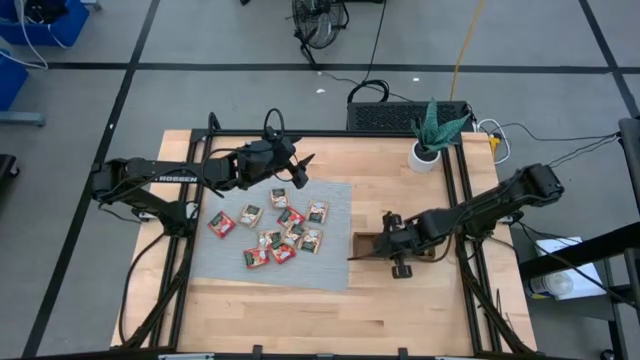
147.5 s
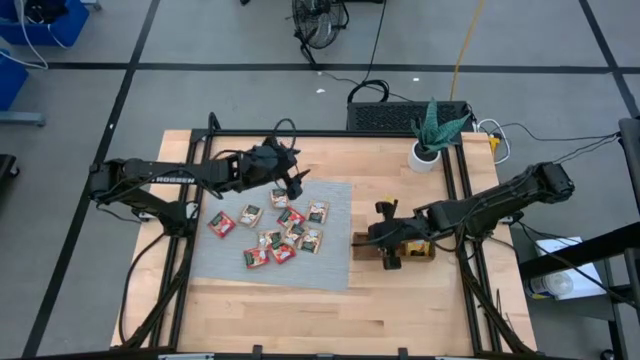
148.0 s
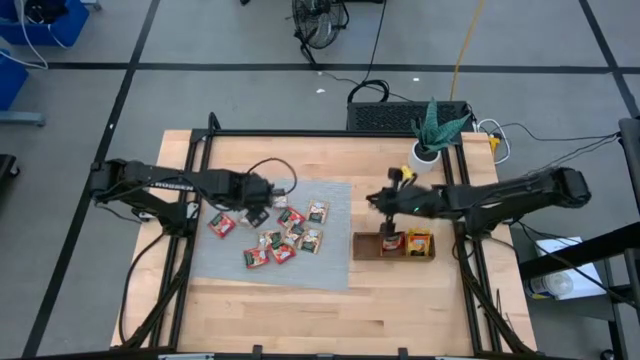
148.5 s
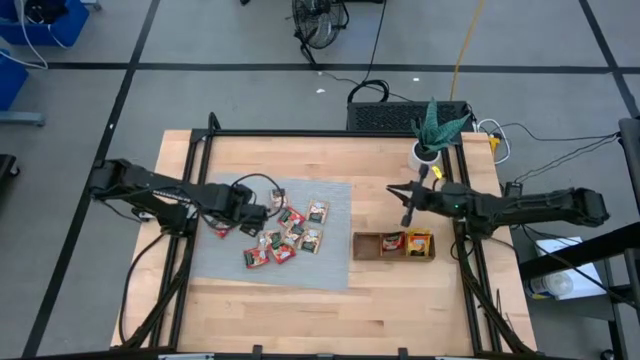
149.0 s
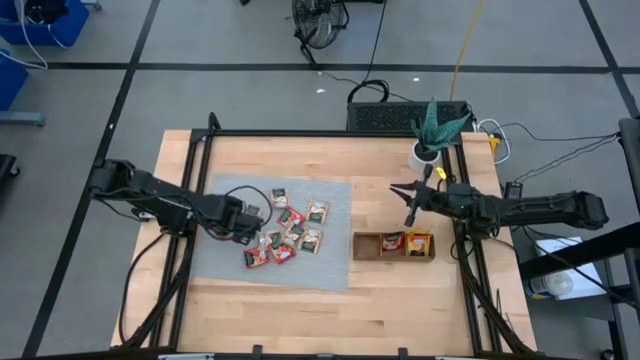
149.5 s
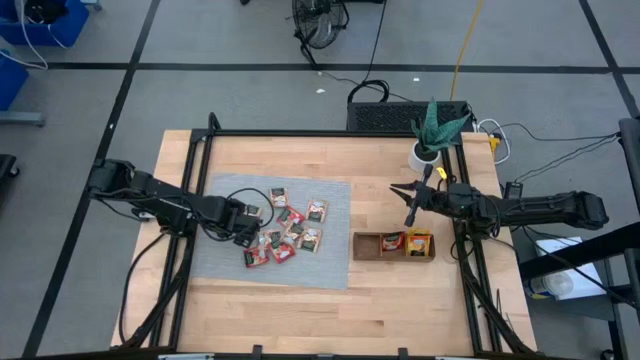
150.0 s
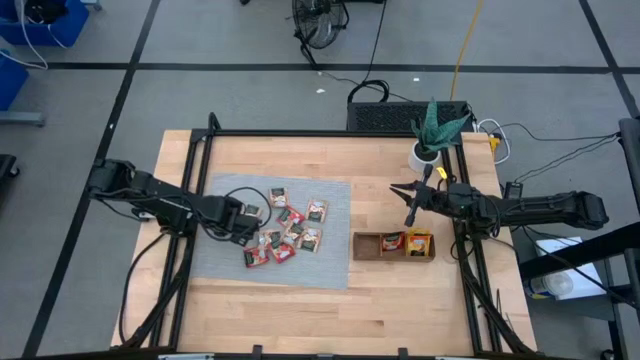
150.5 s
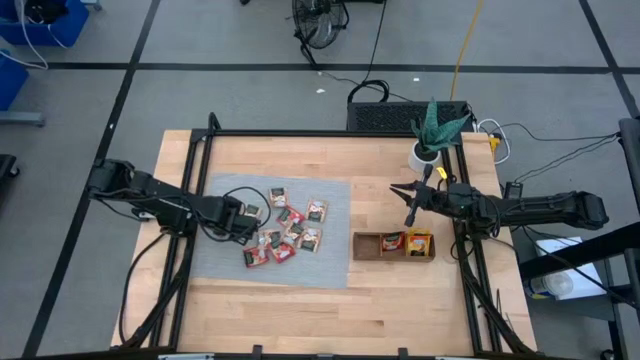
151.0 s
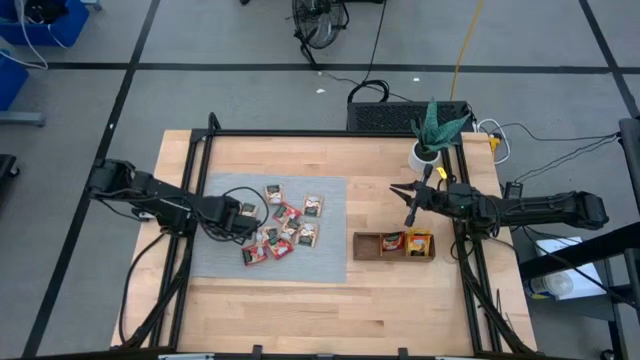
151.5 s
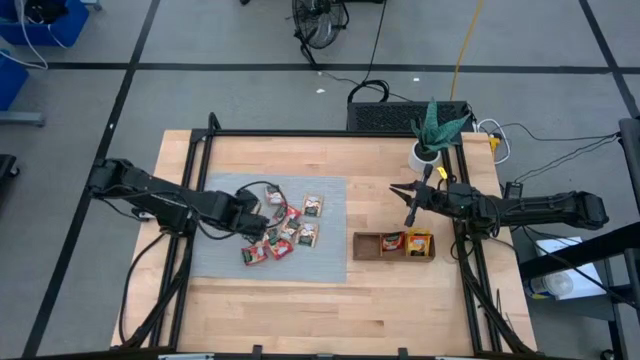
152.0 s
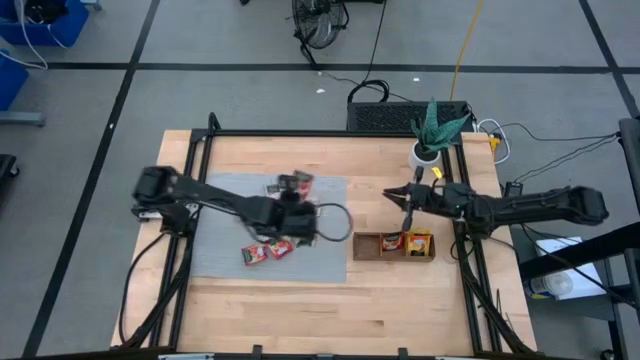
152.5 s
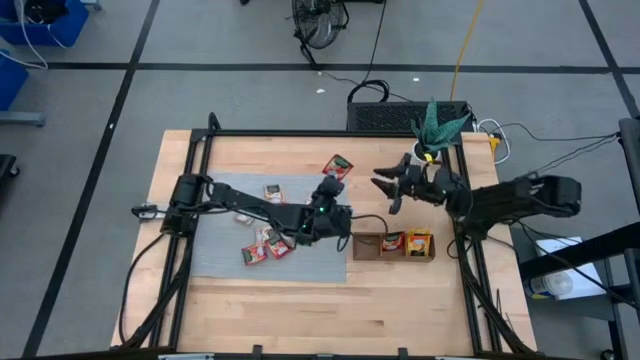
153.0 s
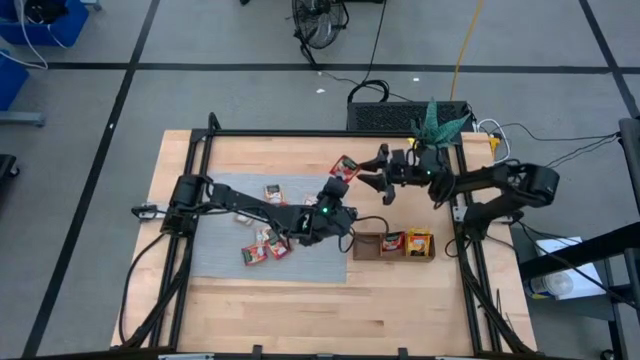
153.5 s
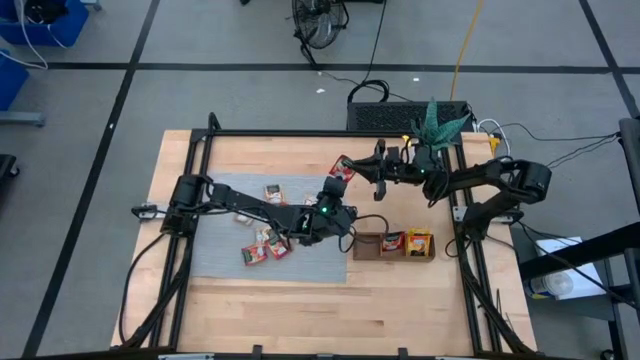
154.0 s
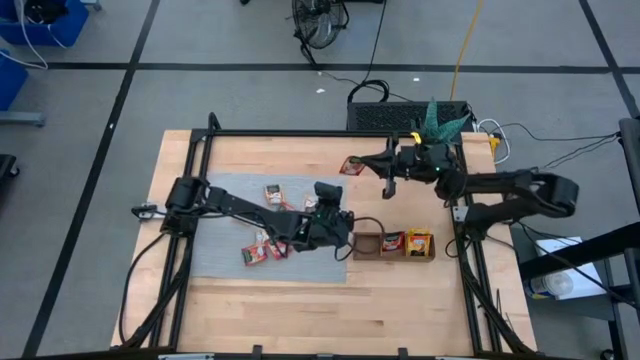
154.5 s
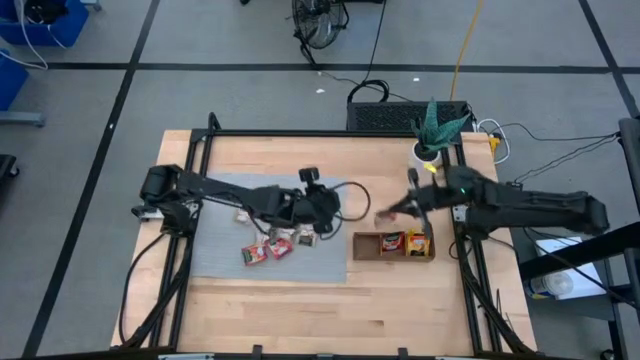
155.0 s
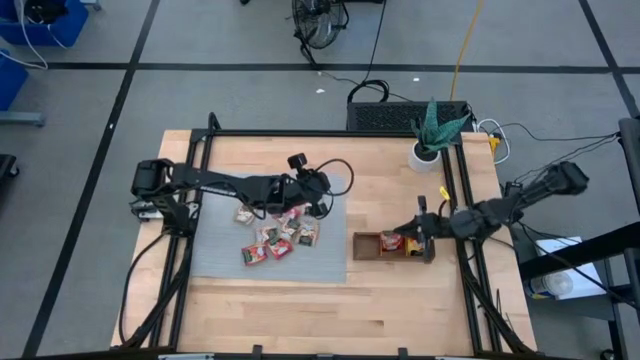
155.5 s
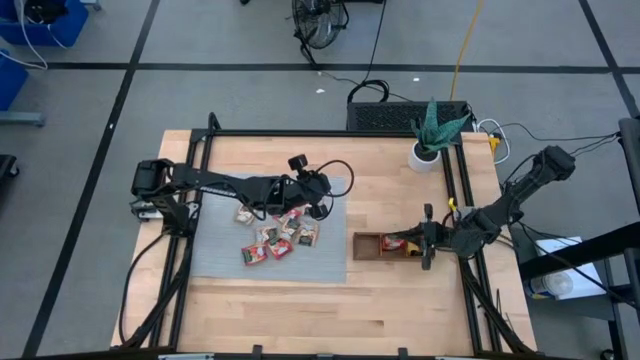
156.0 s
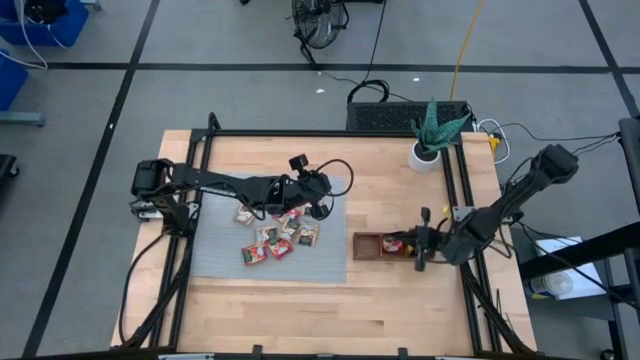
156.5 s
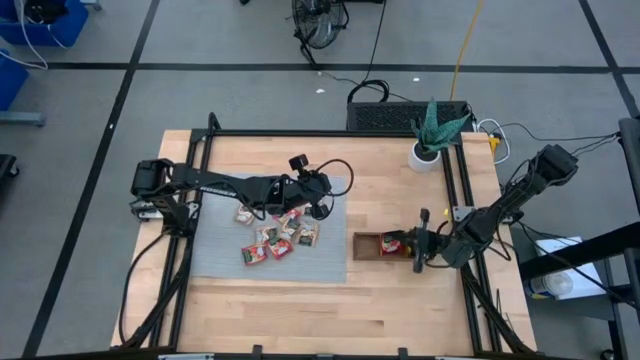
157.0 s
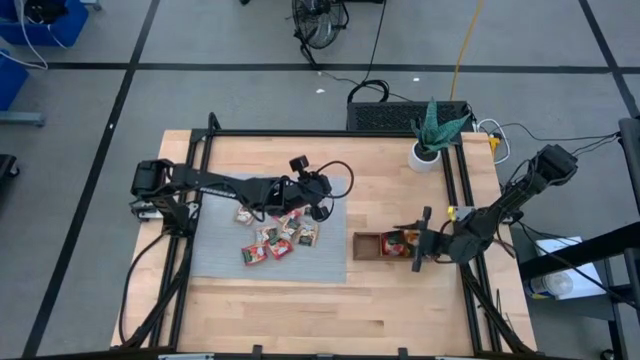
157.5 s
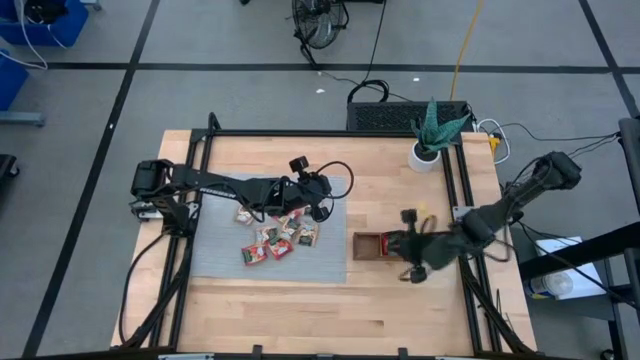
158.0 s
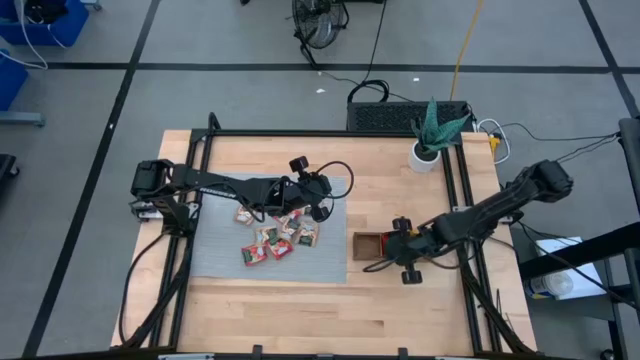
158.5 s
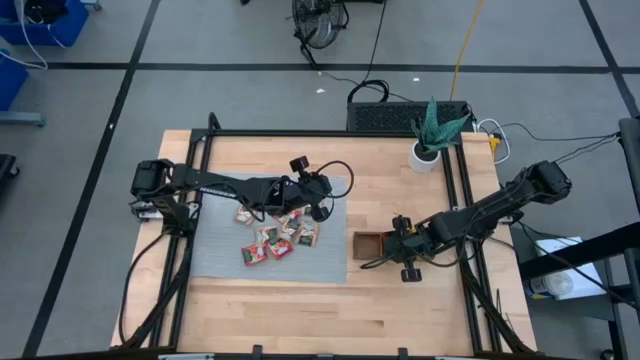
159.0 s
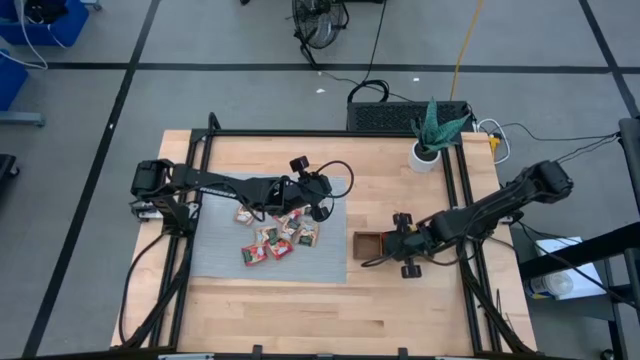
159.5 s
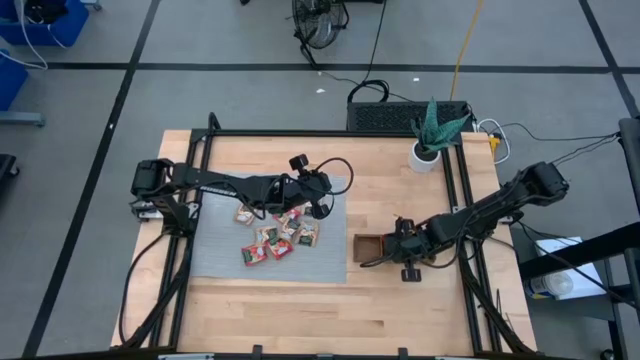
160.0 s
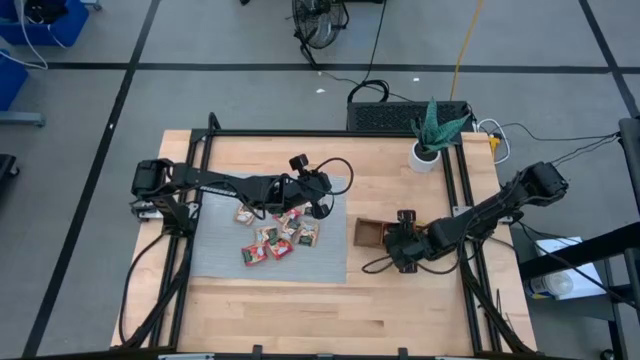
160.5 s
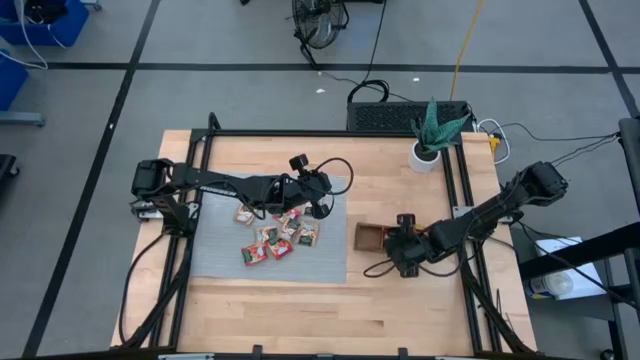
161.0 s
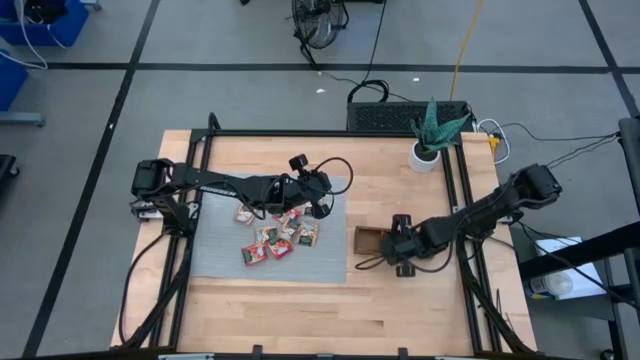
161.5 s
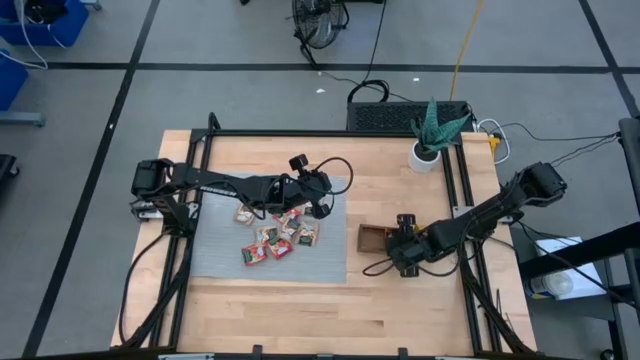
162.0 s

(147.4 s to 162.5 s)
Task: Pick & Place Tea
Put the red tea bag into the middle section of the wooden organizer

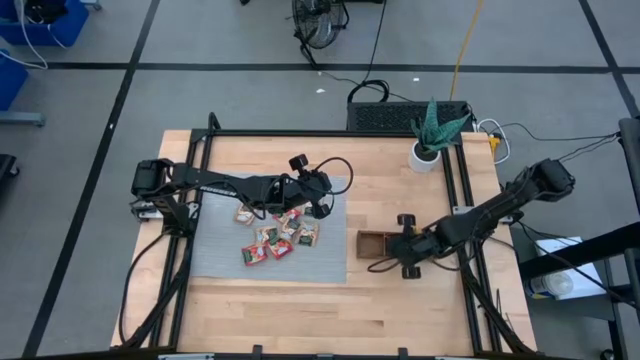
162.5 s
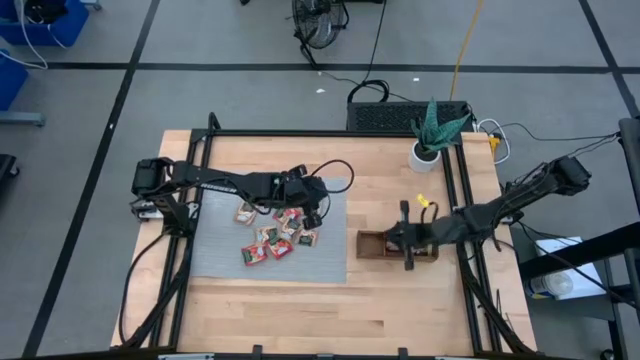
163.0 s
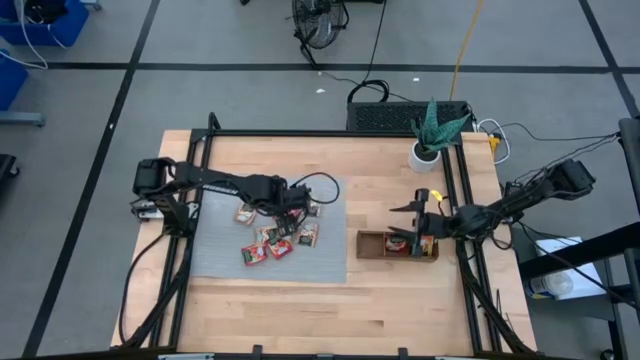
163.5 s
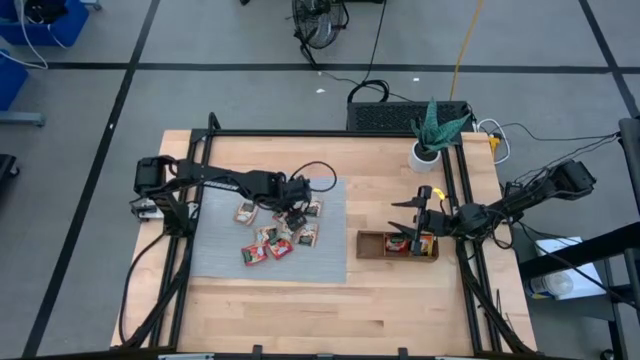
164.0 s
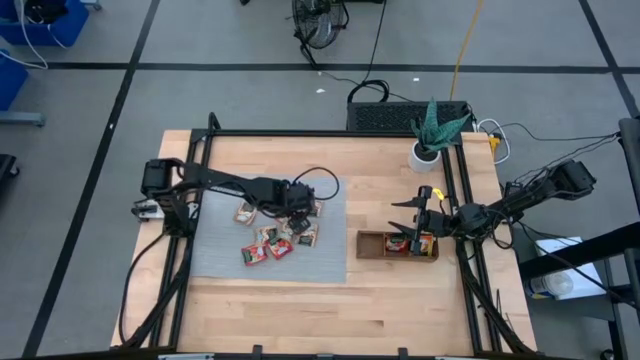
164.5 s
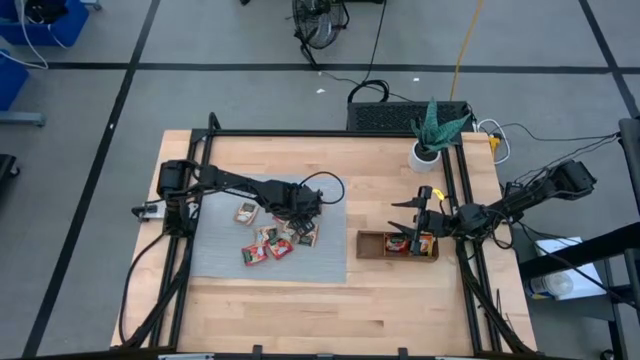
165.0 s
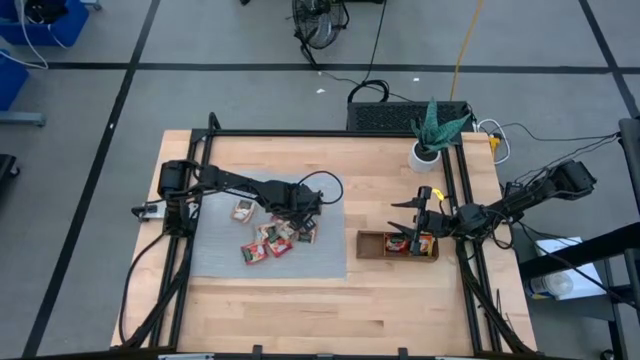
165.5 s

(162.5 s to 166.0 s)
Put the red tea bag into the middle section of the wooden organizer

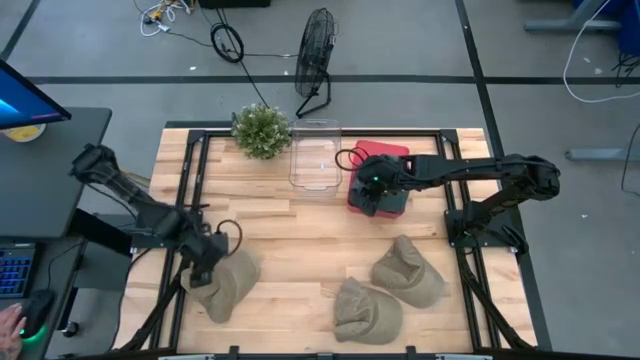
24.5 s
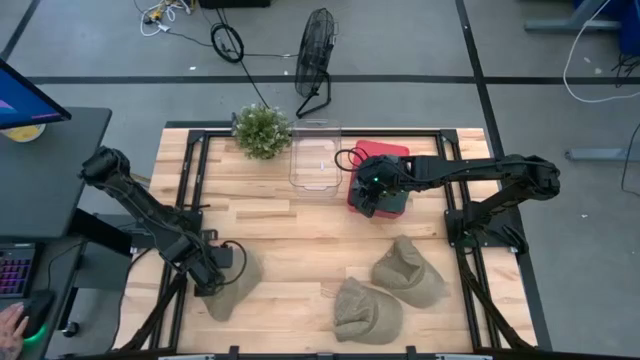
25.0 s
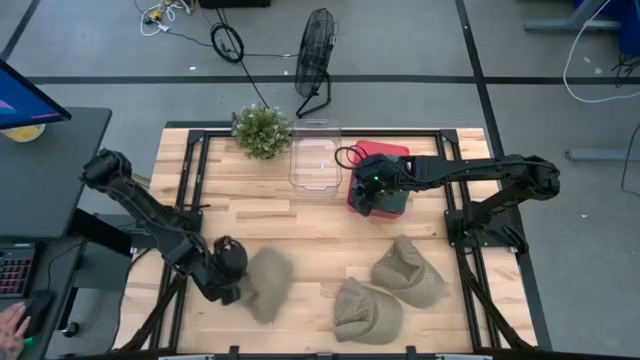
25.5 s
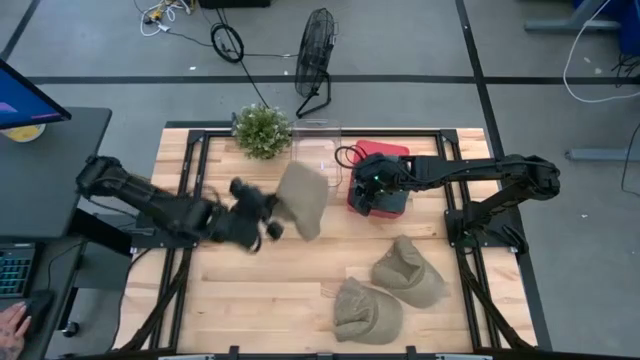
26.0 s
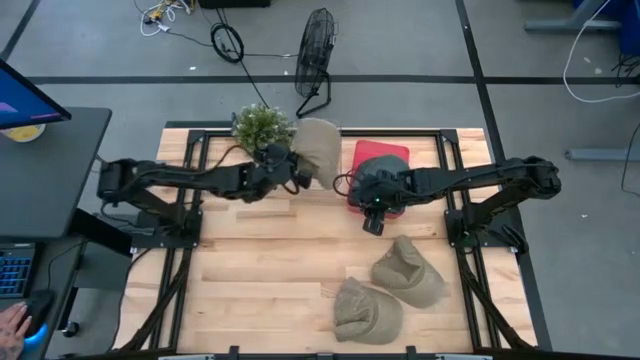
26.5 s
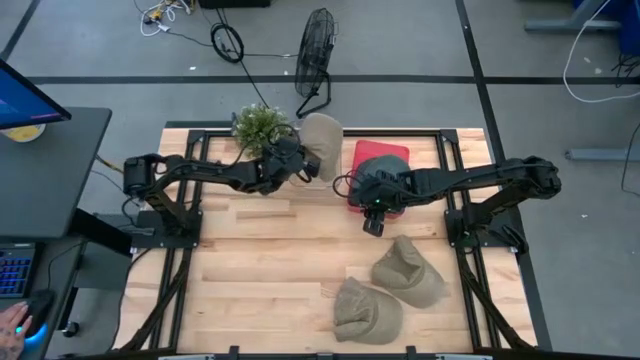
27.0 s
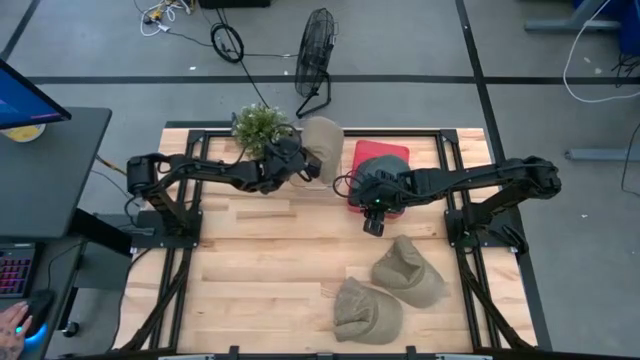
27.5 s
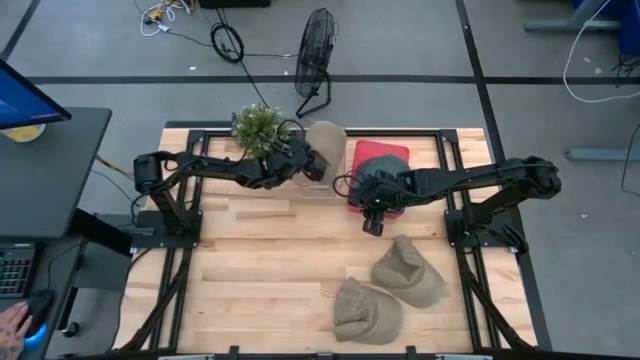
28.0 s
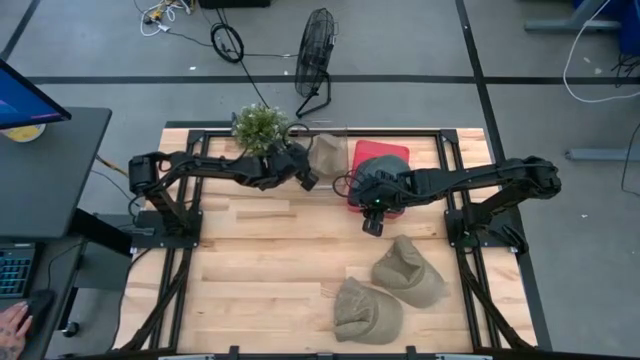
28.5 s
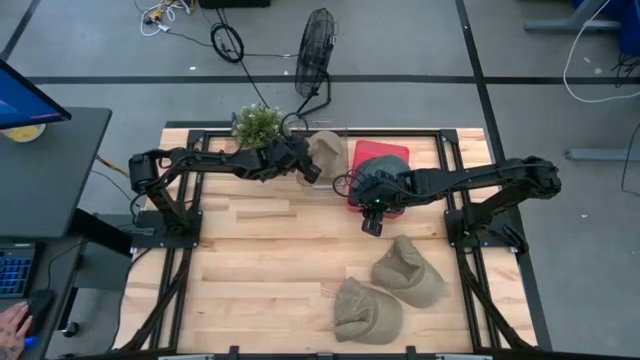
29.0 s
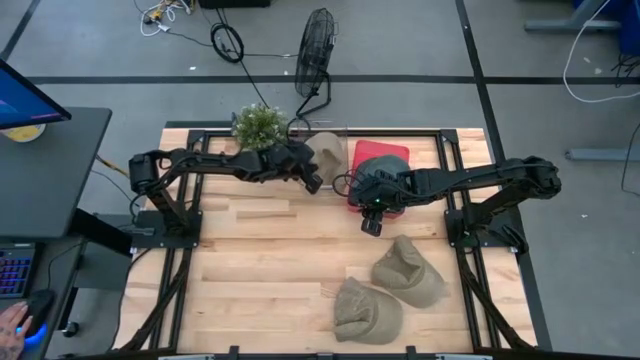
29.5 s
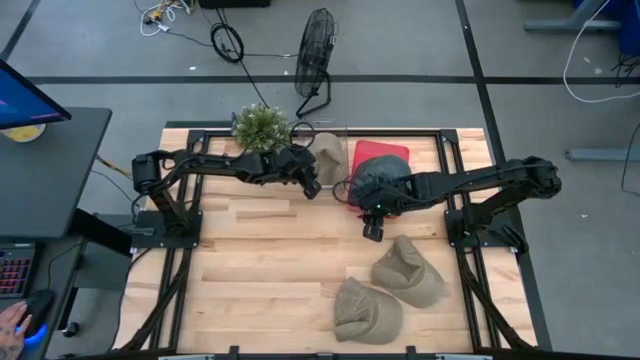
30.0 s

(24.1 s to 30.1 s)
Task: Pick & Place hat
Put the top left brown cap into the transparent bin
